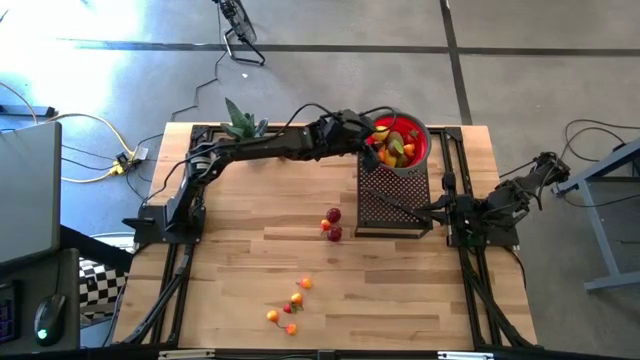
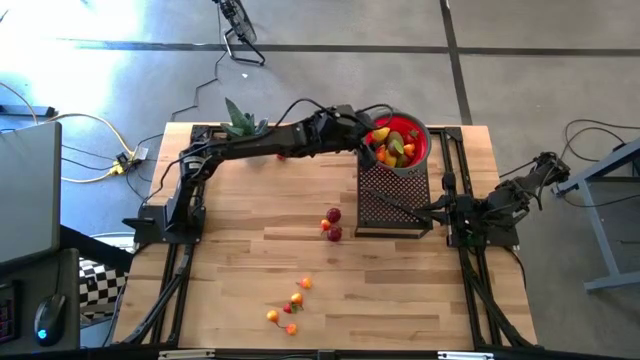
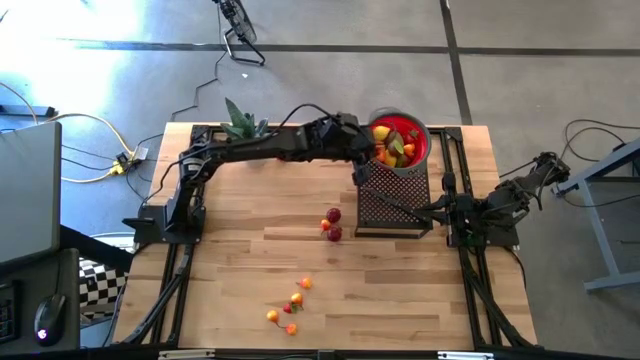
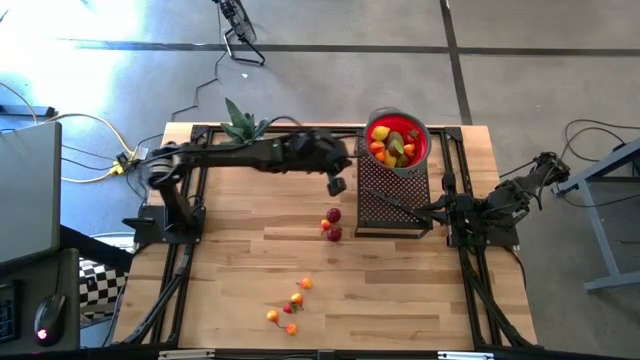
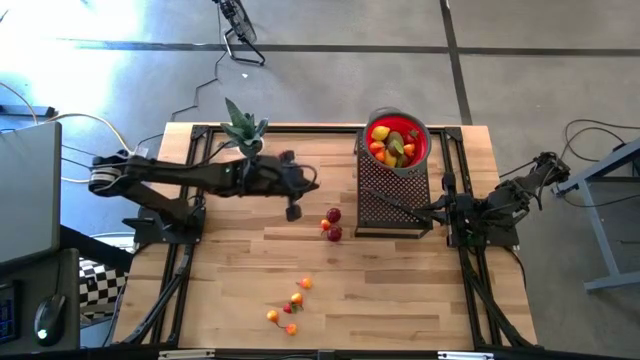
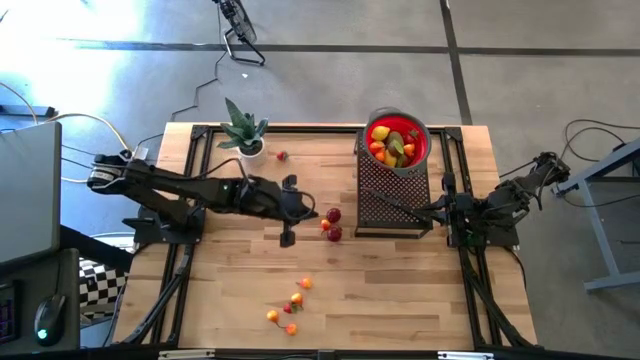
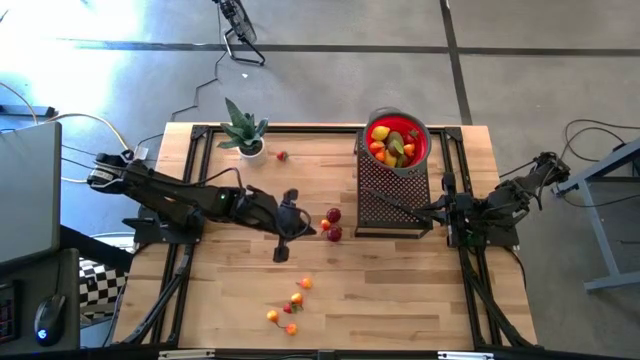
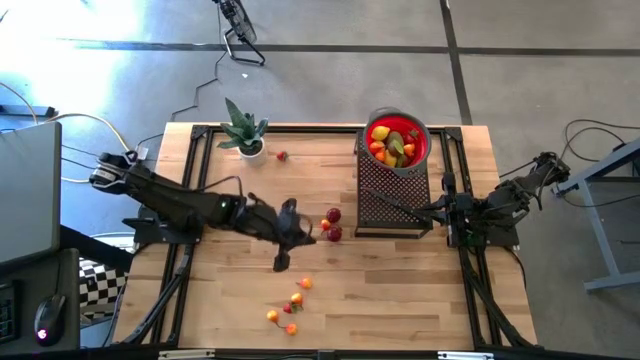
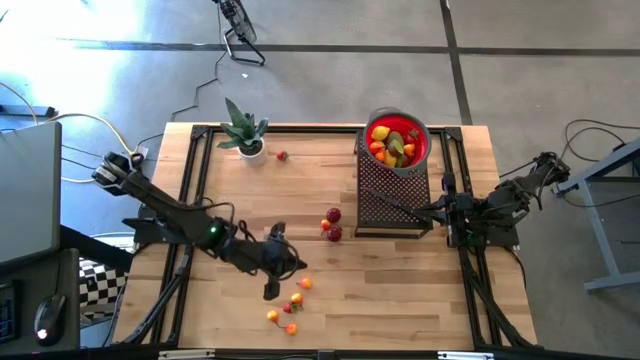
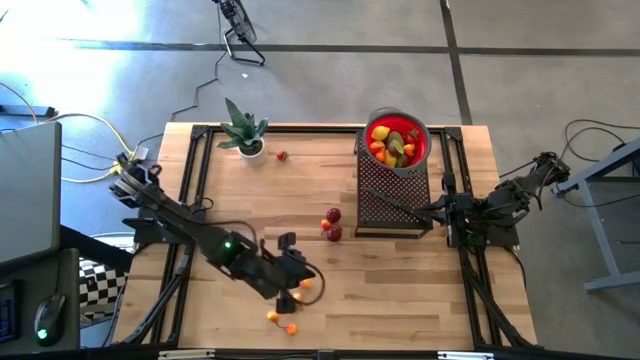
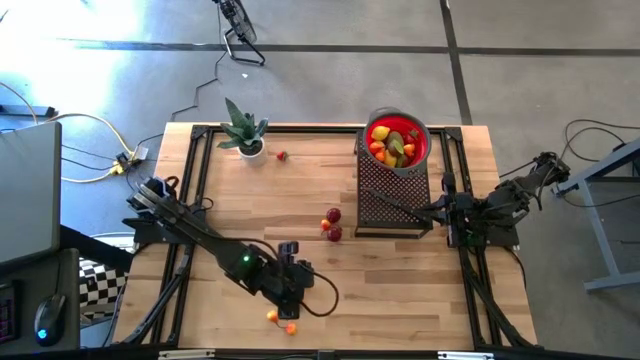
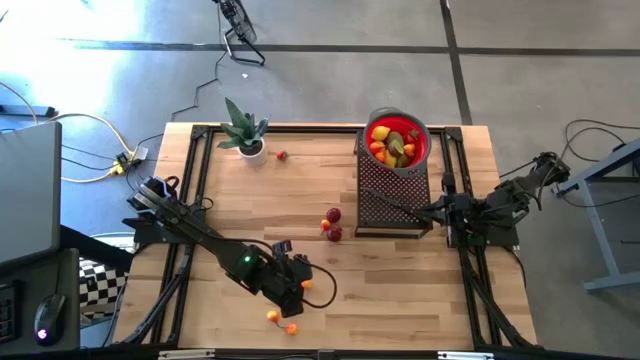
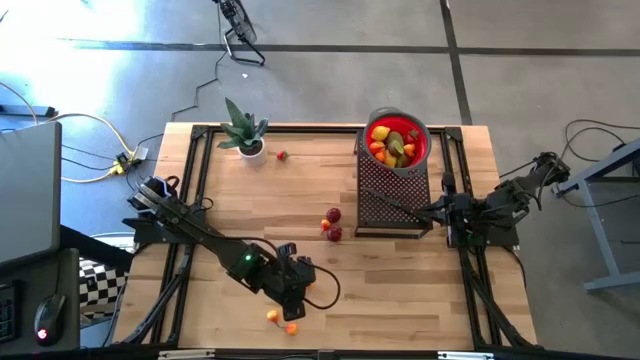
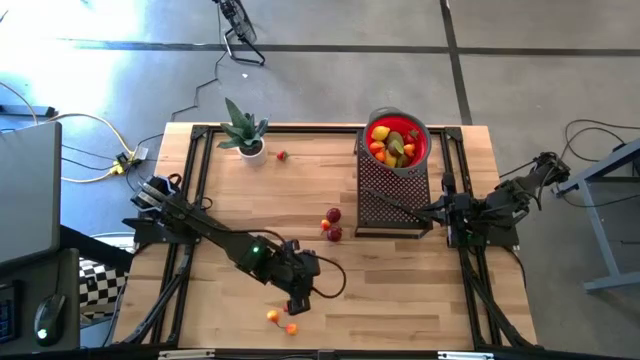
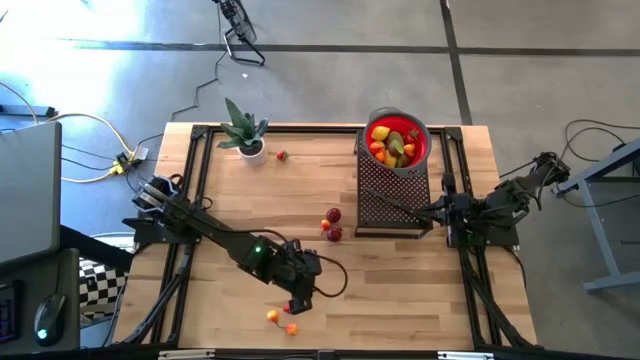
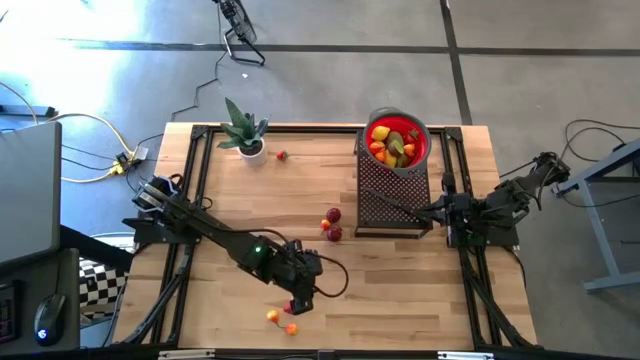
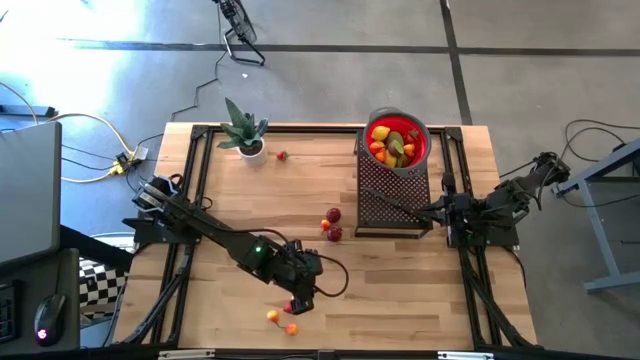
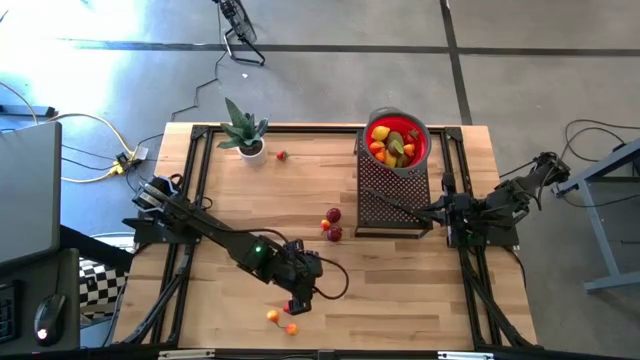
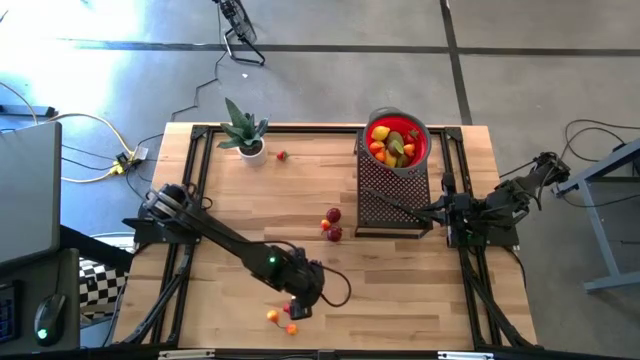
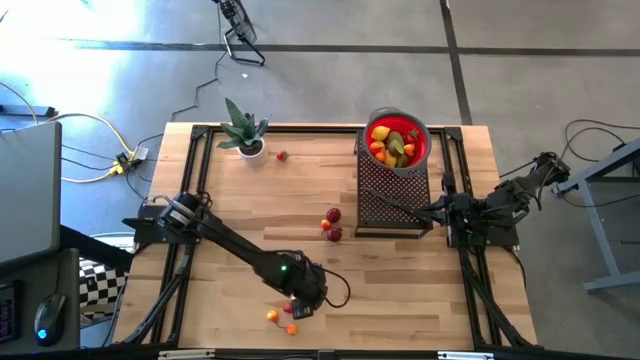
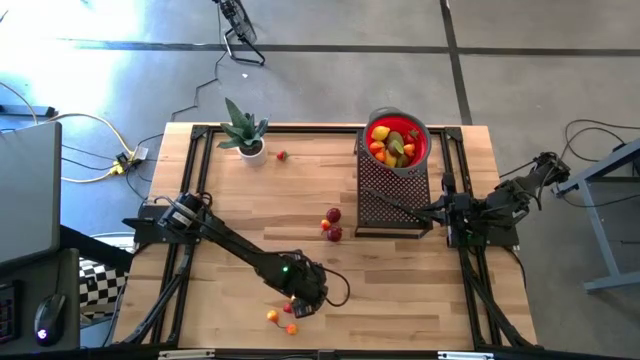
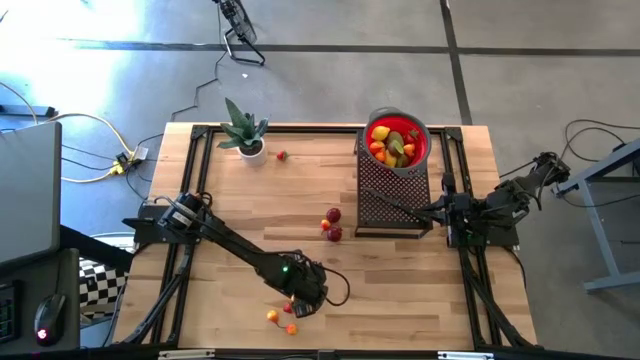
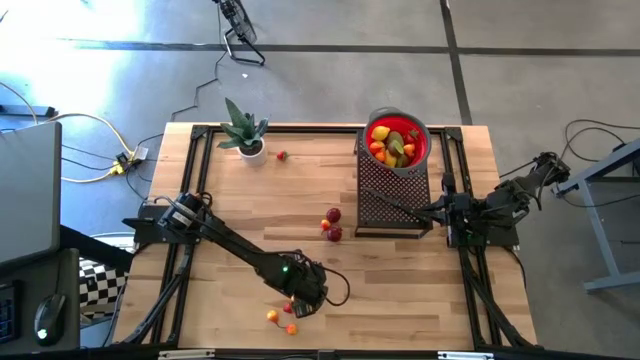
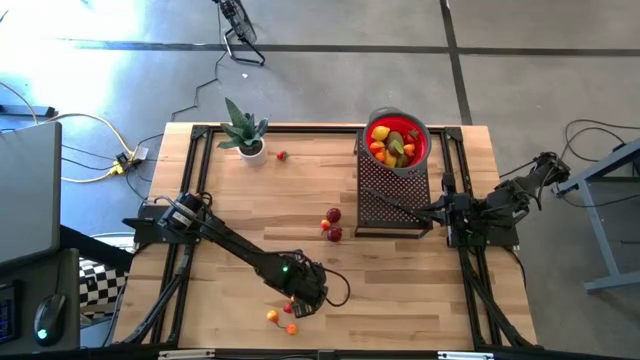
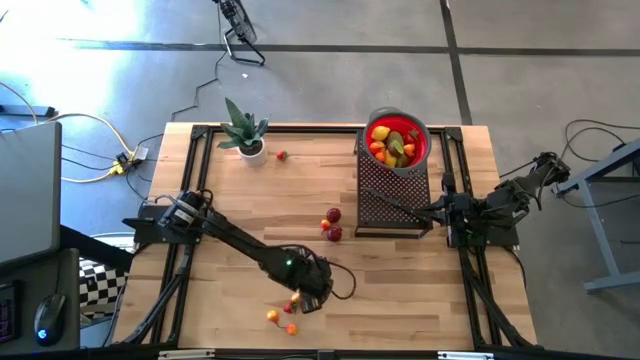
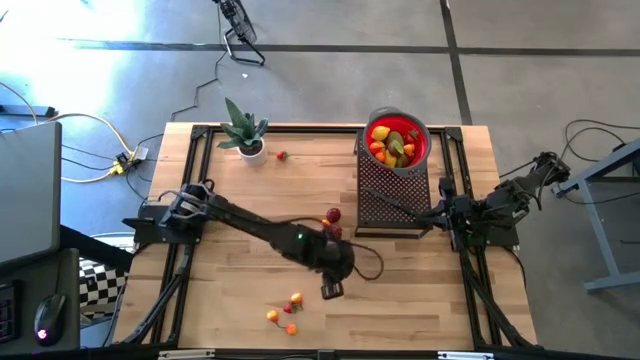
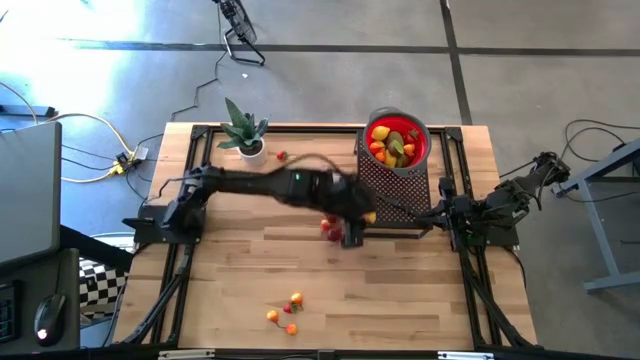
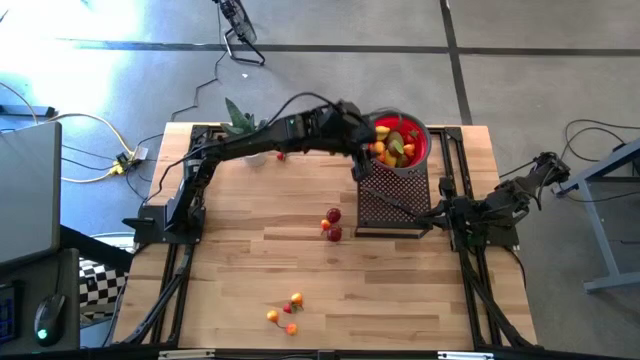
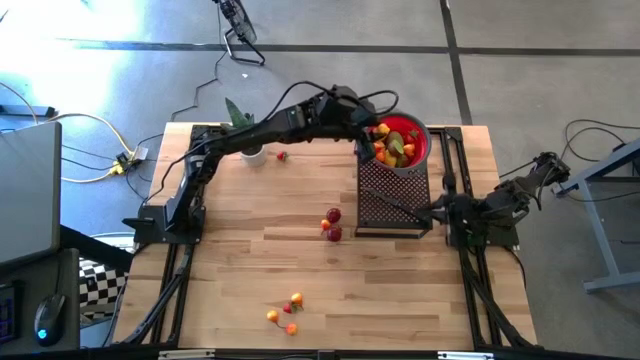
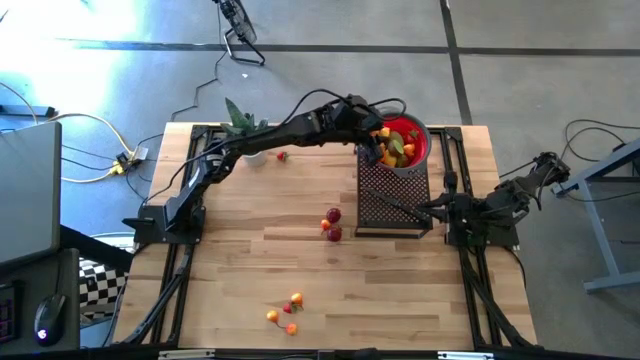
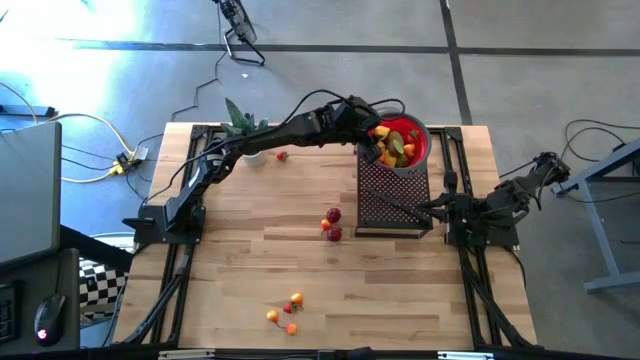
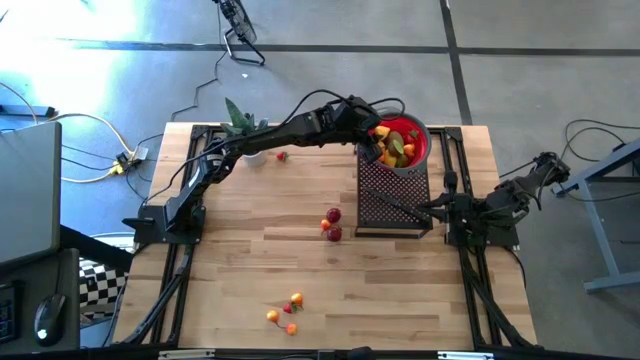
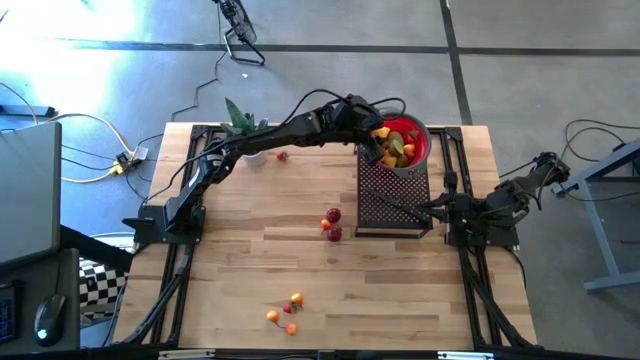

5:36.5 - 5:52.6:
Task: Pick & Place Fruit
Put the pear into the strainer bowl on the shelf

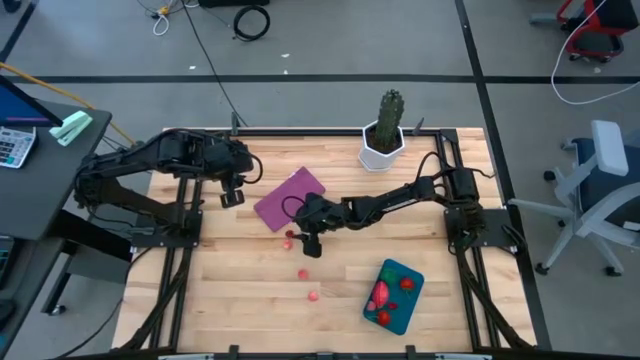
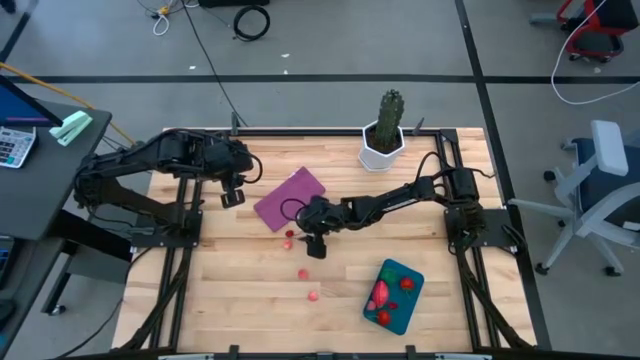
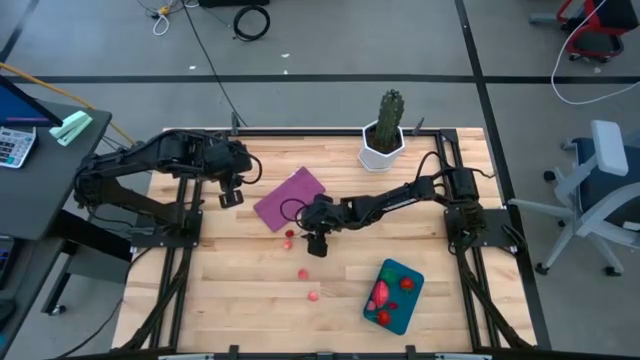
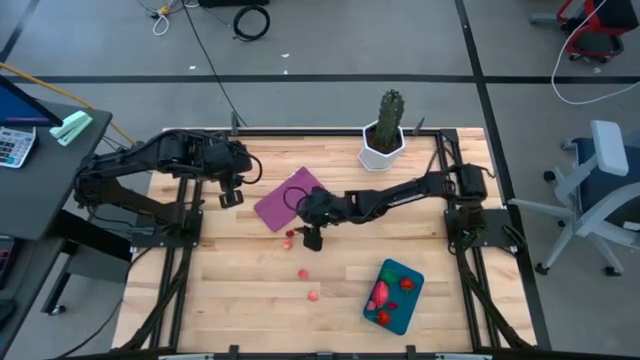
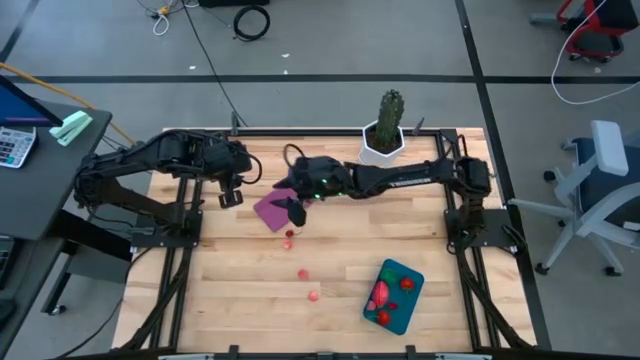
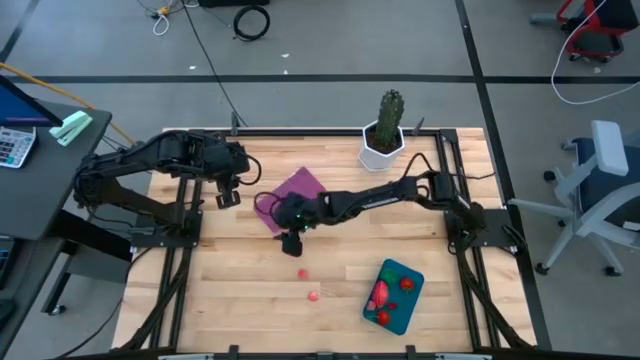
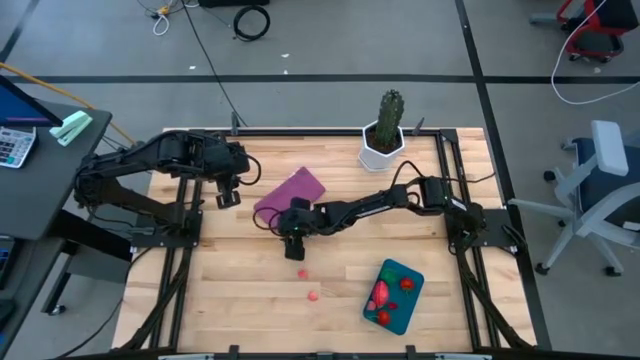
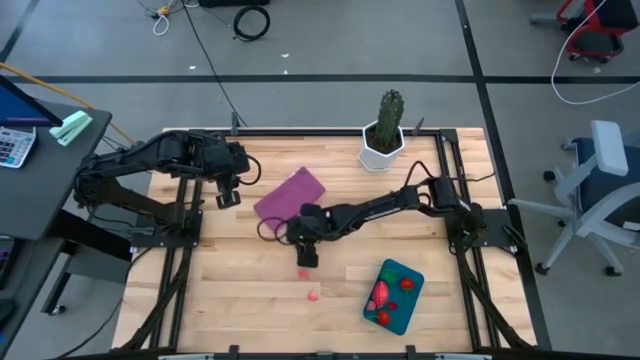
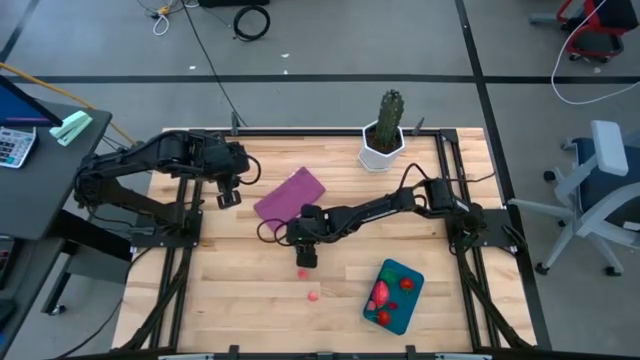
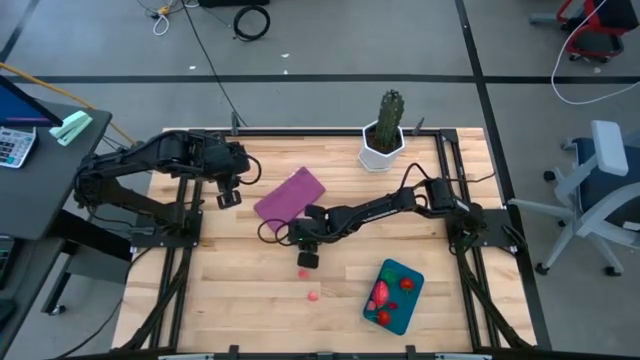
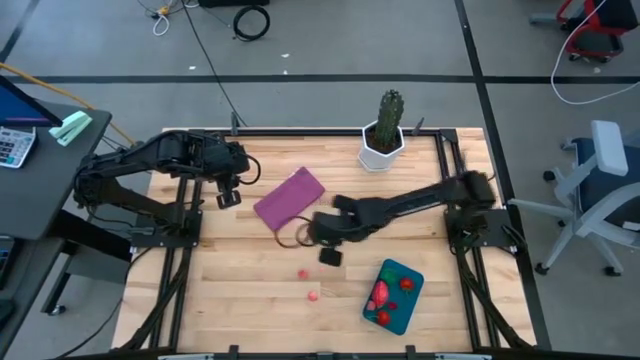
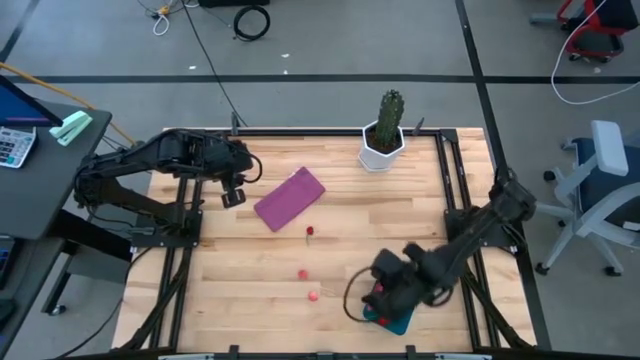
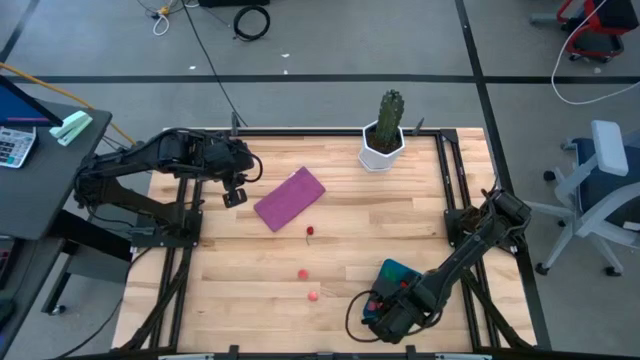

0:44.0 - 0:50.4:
Task: Pick and placing Produce into tupperware
Put the peach into the blue bin
